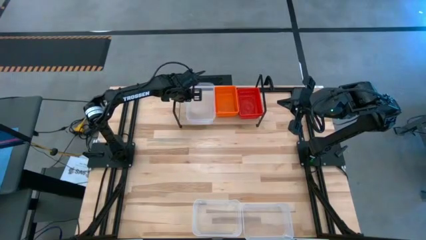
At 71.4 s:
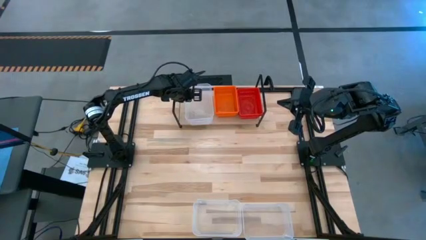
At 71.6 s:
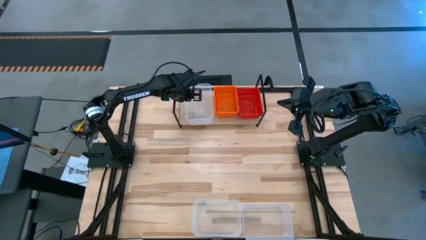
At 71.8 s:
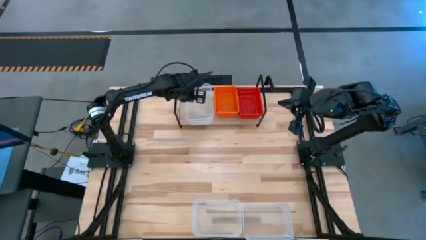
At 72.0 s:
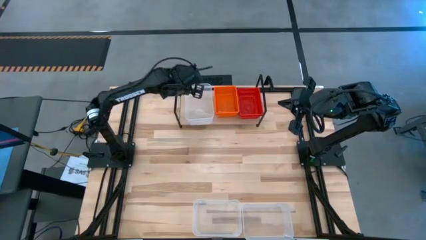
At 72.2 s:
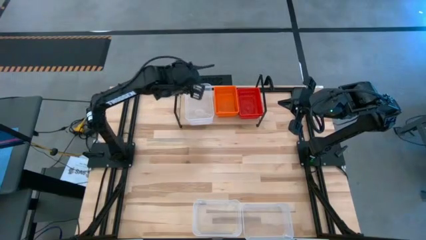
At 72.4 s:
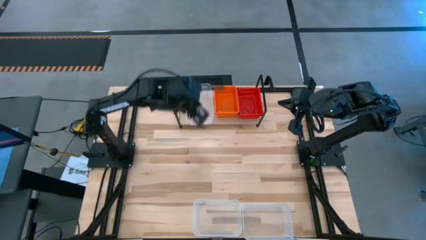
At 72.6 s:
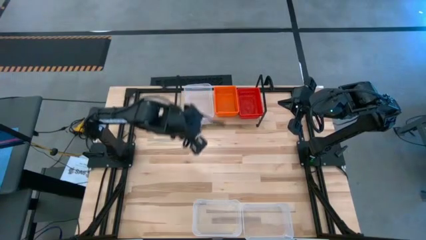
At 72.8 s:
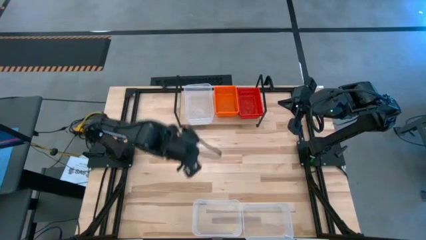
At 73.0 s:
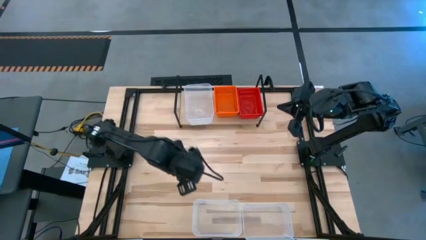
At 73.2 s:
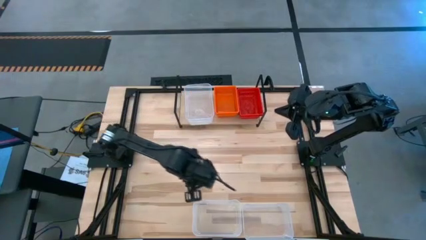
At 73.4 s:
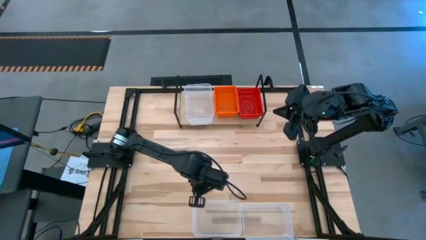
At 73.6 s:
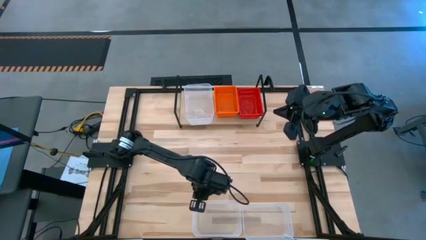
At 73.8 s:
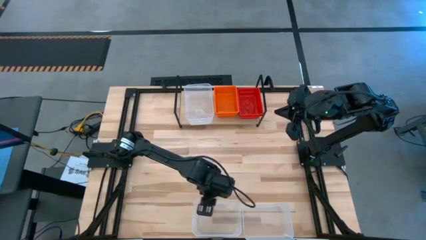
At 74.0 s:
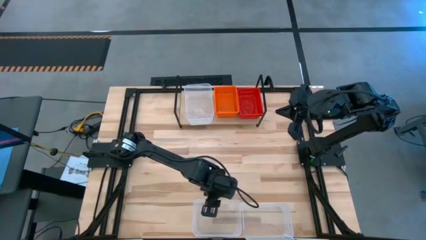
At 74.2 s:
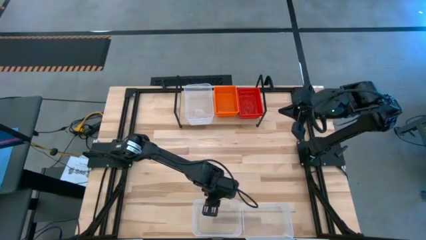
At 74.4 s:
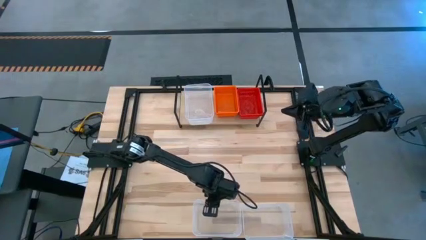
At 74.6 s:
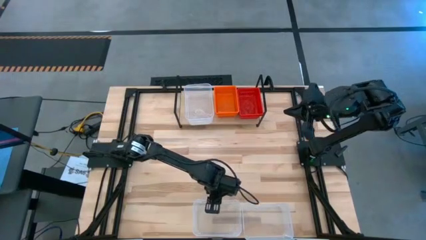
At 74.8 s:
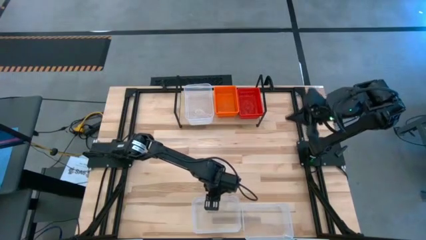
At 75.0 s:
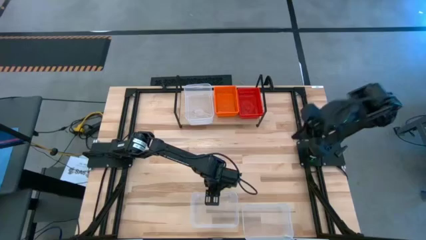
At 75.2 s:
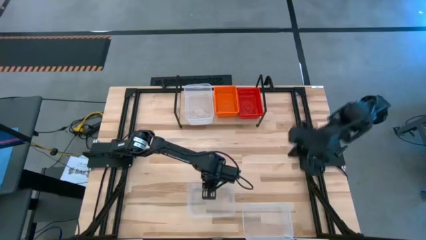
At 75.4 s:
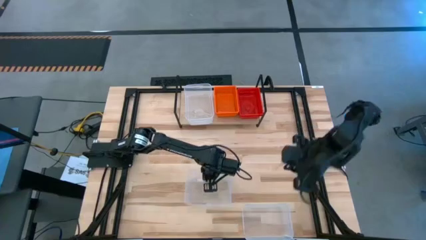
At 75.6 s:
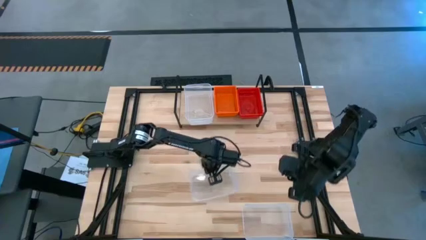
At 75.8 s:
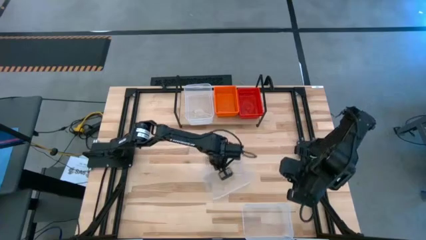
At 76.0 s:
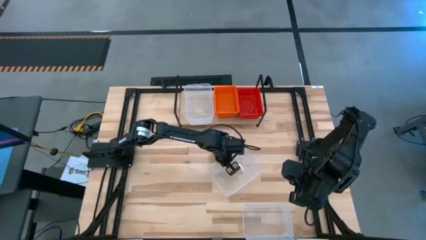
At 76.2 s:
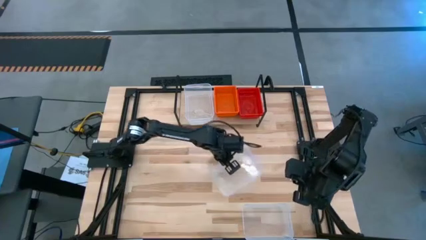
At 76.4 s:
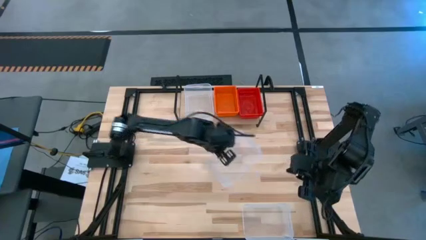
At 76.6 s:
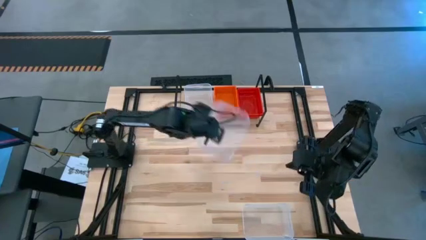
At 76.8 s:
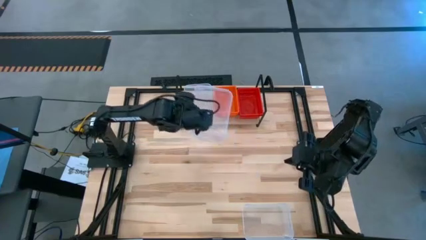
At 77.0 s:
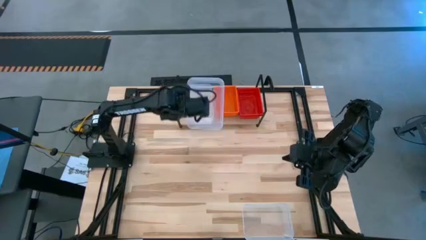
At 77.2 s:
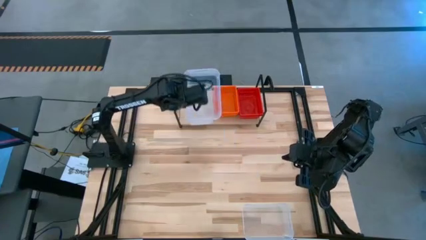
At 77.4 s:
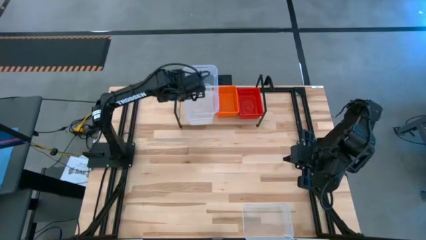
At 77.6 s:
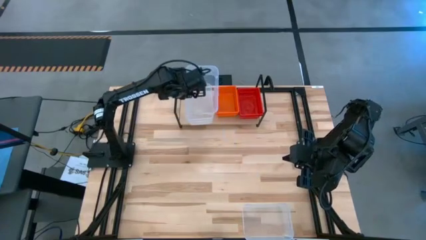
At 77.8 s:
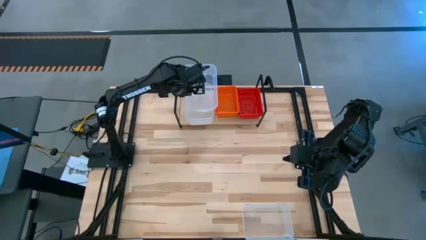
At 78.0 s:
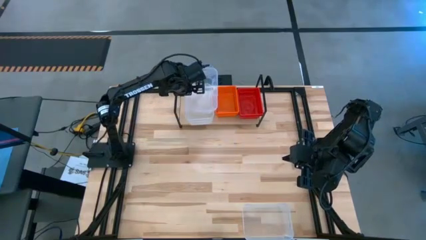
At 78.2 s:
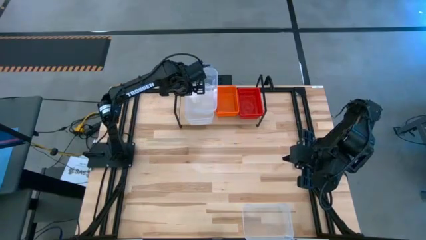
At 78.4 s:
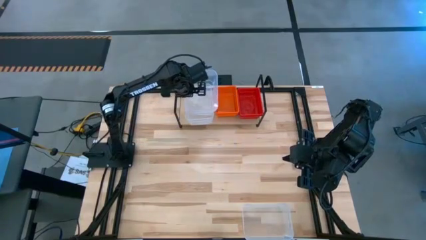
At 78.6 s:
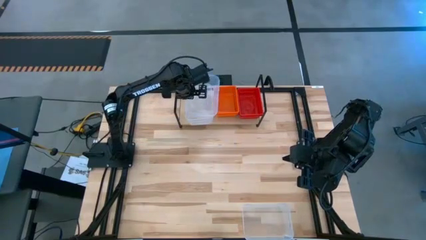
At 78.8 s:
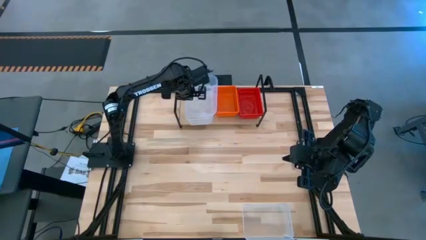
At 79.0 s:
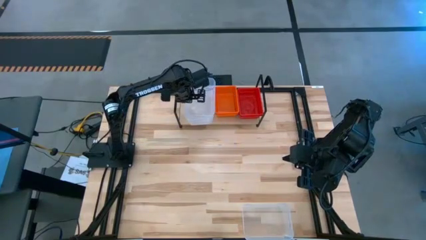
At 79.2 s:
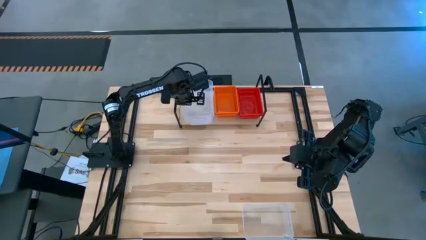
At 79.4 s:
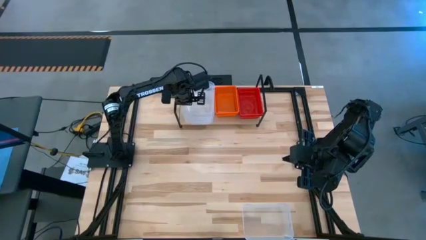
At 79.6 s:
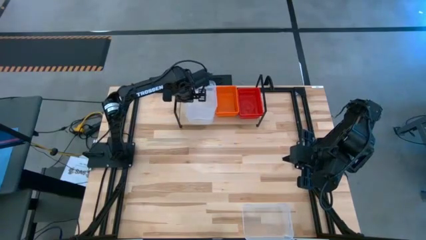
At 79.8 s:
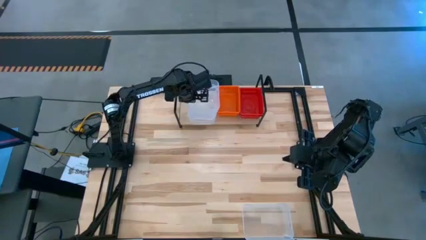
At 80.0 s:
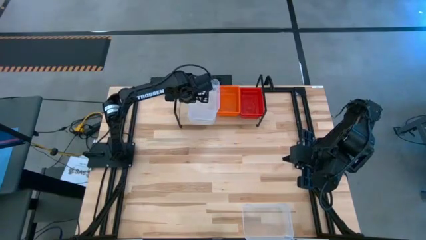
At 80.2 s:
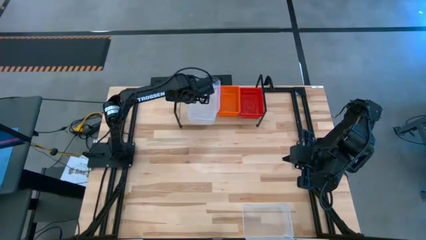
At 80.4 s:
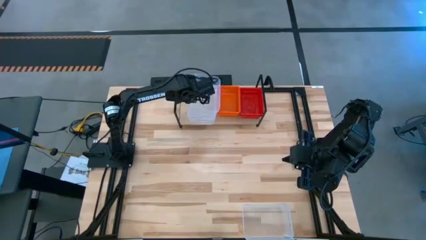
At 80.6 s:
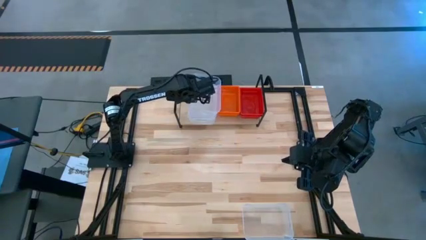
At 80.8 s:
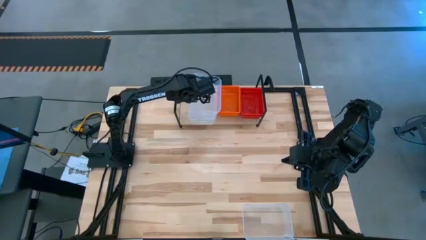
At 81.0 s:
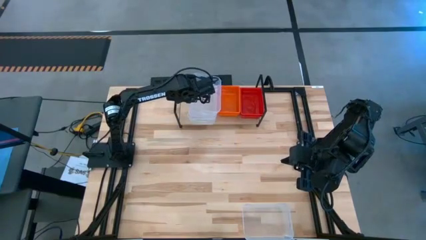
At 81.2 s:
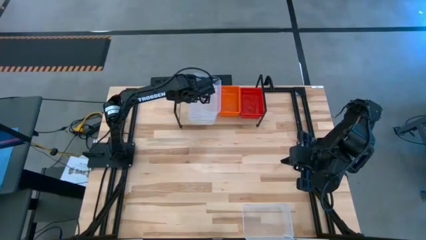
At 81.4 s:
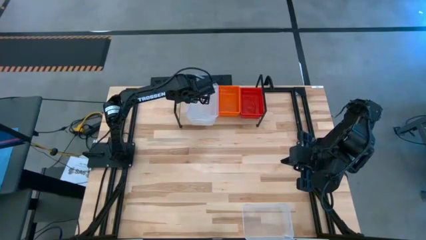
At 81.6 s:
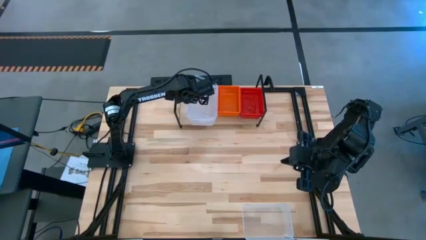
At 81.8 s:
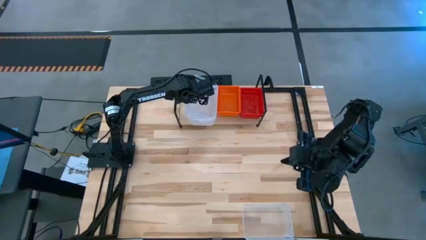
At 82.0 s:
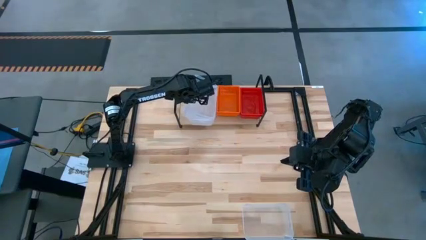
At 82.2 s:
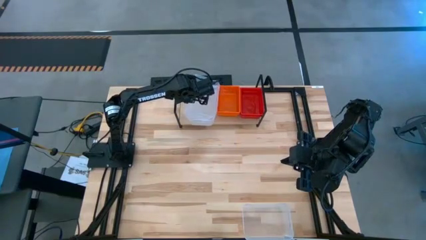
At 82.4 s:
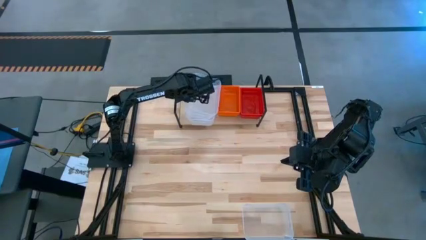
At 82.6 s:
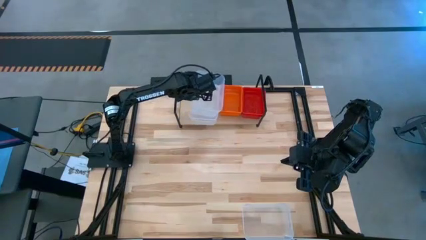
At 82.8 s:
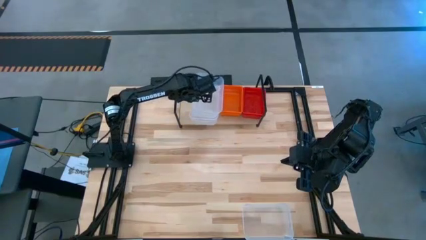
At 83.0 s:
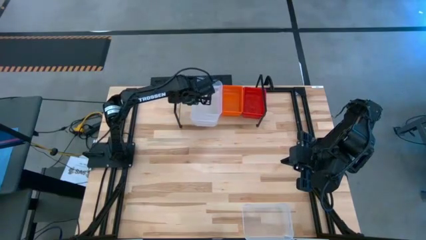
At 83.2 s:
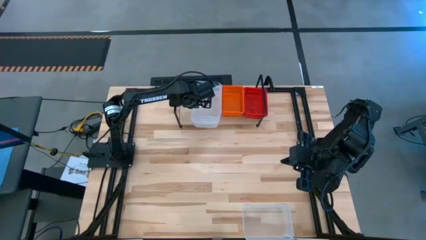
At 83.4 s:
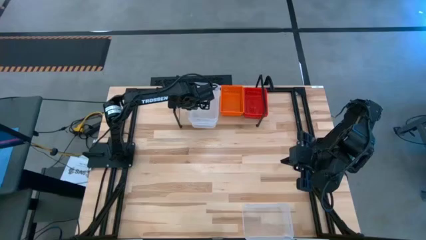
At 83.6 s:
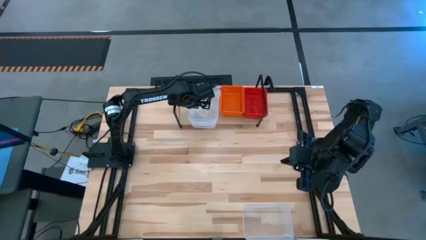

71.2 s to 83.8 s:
Task: Stack baskets on shelf by color
Stack the left transparent bin on top of the transparent bin on the shelf

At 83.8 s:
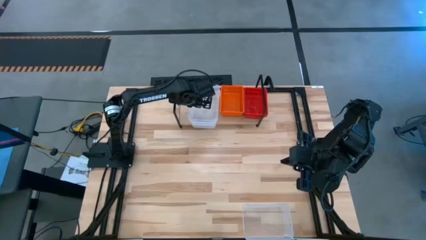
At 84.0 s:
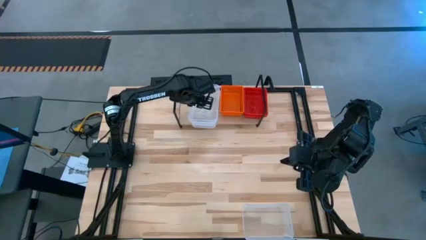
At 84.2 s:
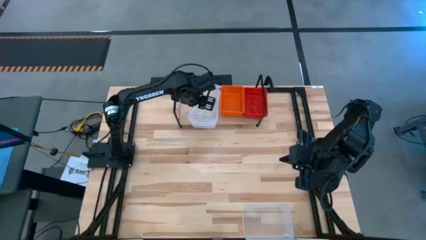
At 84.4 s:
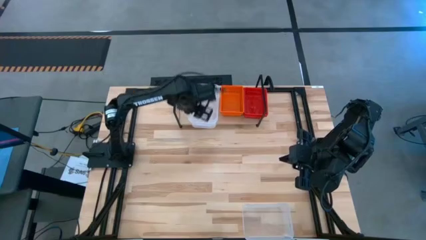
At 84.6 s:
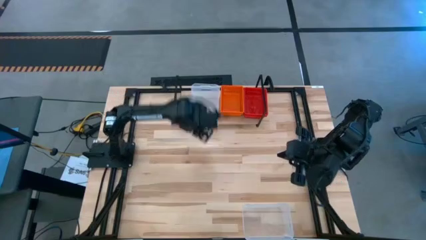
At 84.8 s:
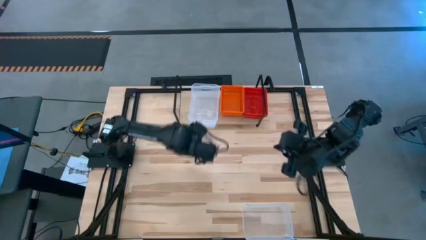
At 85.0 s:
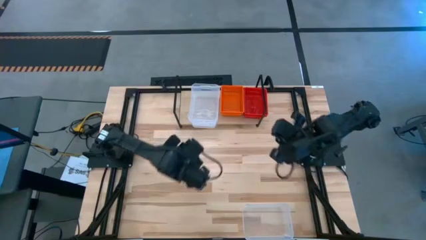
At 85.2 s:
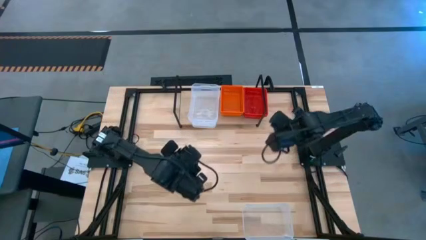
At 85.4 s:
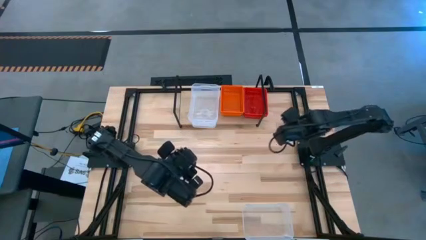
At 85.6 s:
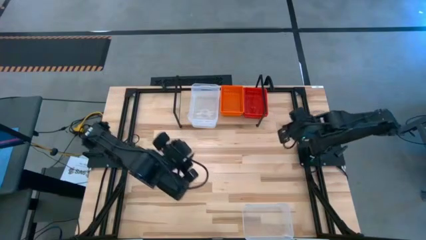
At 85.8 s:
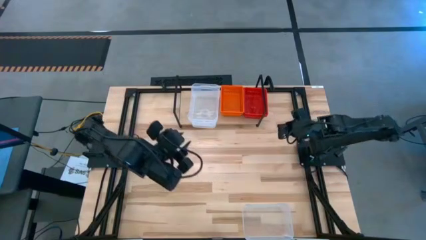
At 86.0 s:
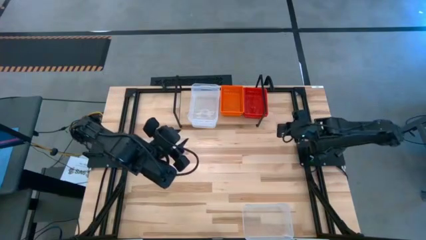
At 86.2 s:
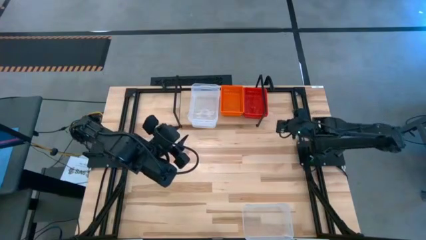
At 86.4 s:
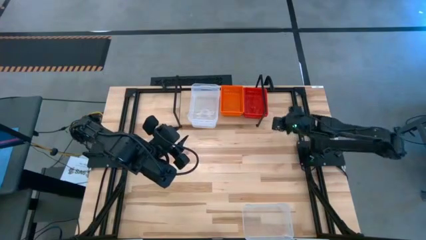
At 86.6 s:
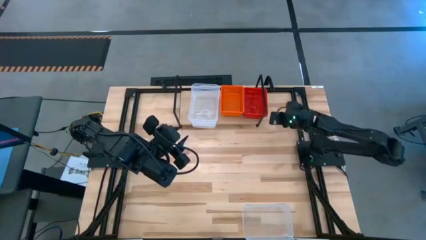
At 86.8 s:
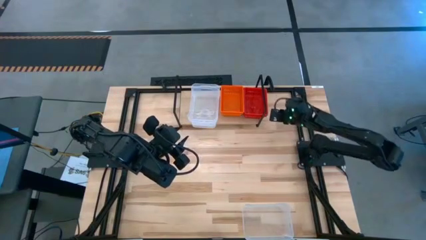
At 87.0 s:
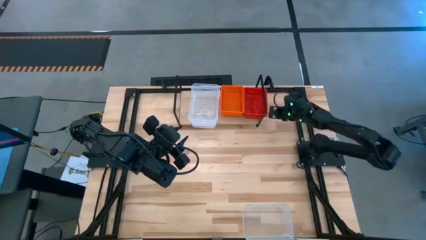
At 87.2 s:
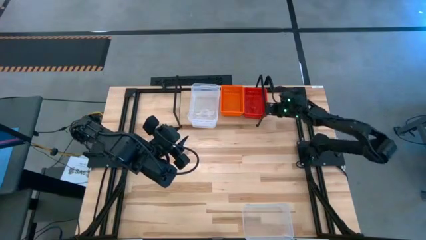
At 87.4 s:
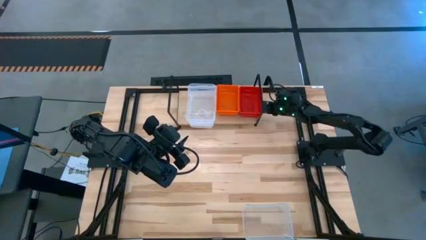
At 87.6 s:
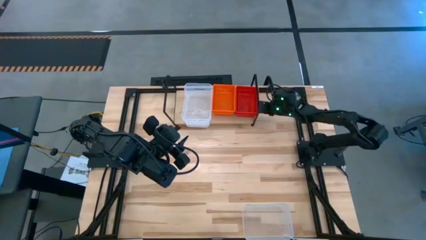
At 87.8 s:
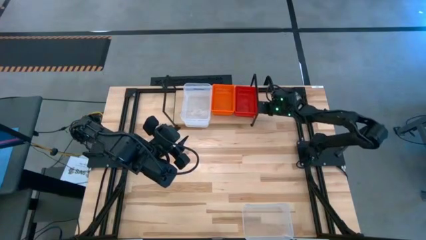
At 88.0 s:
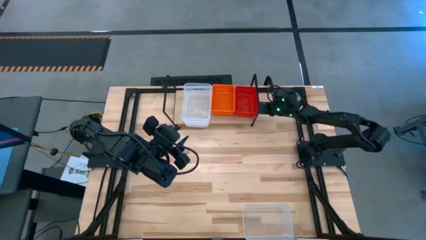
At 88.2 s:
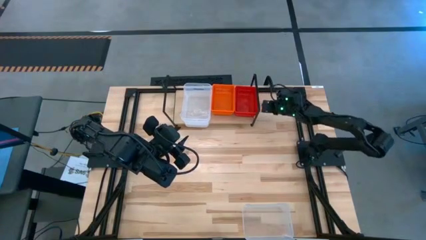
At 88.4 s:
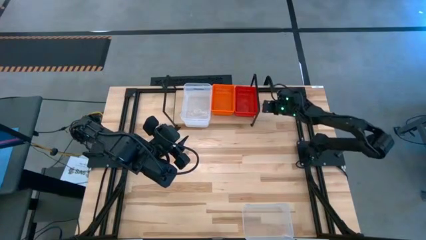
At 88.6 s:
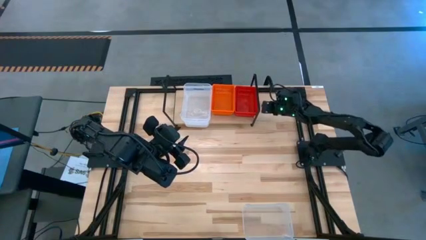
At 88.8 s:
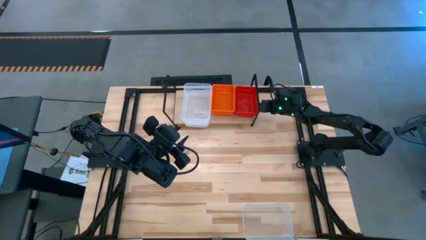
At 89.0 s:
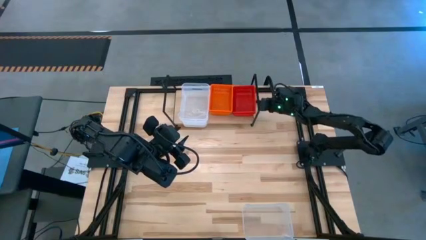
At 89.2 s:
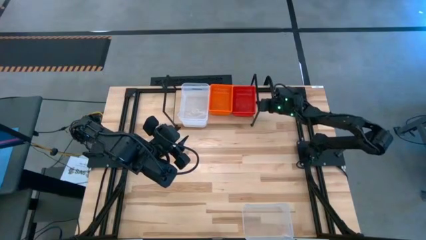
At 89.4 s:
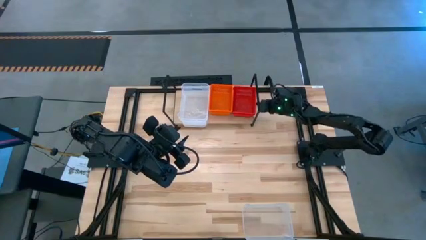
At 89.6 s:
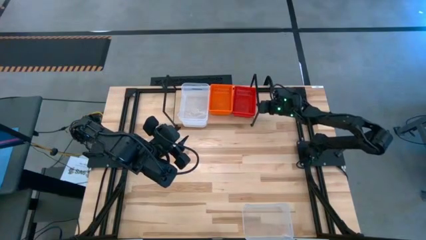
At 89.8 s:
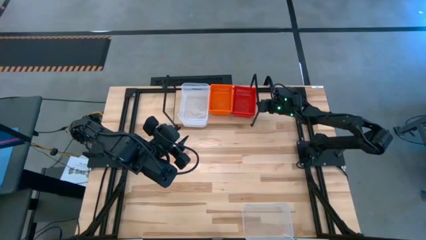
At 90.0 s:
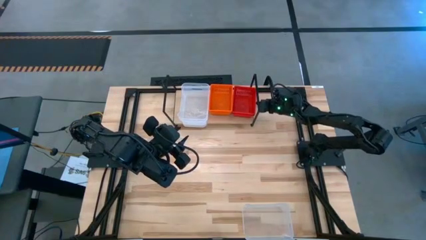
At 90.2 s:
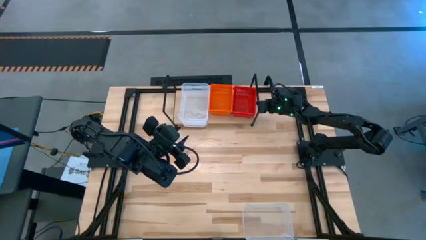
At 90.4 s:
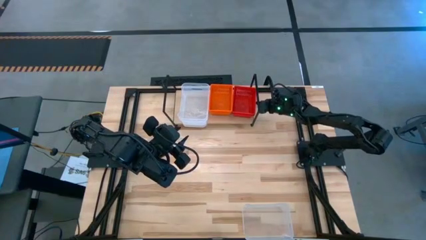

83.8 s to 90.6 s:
Adjust the stacked red bins on the shelf
